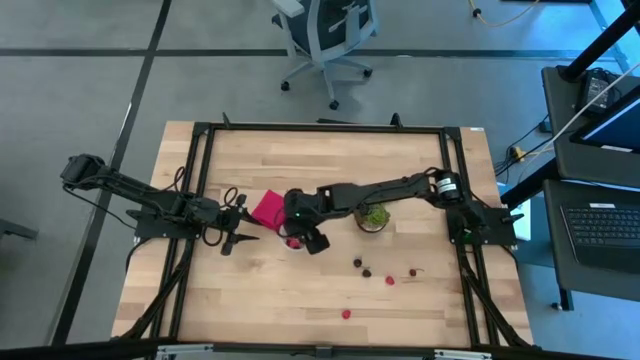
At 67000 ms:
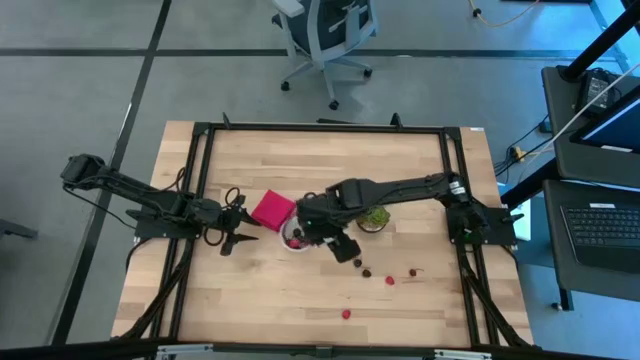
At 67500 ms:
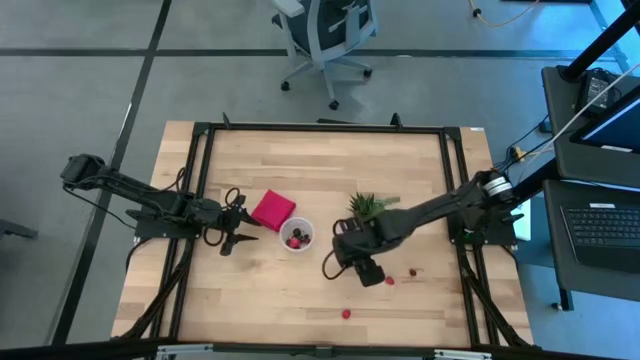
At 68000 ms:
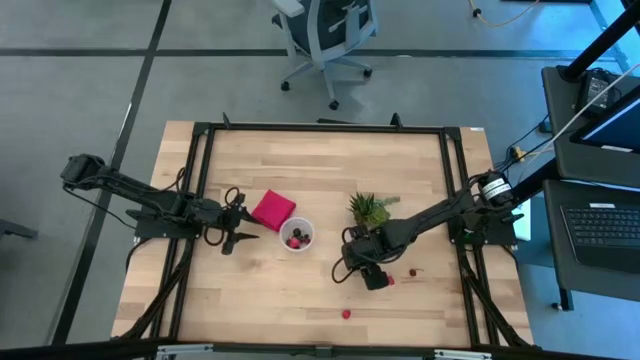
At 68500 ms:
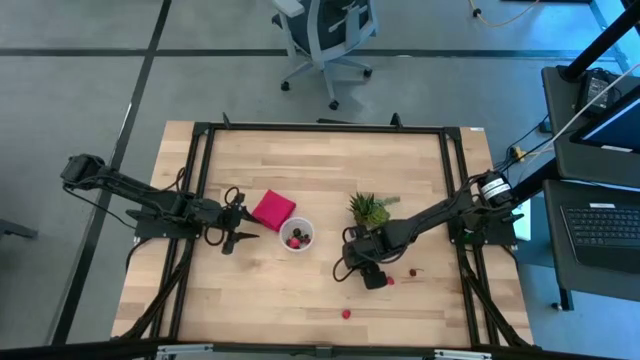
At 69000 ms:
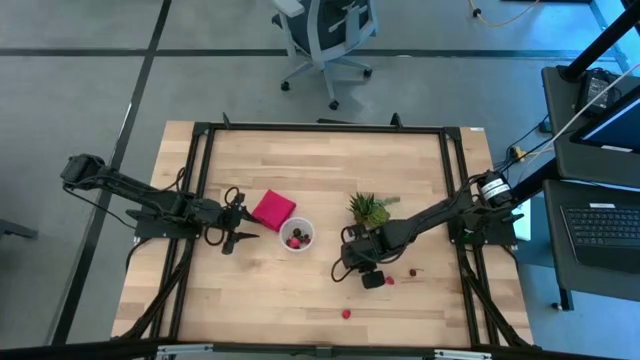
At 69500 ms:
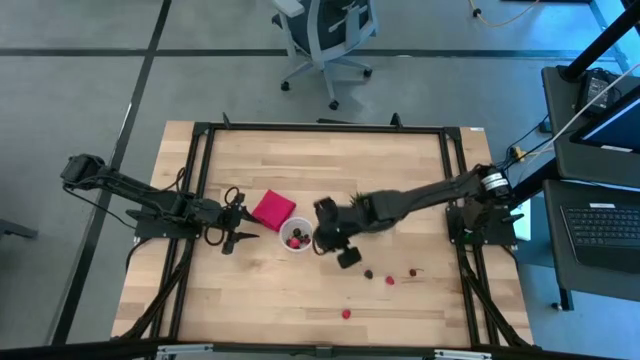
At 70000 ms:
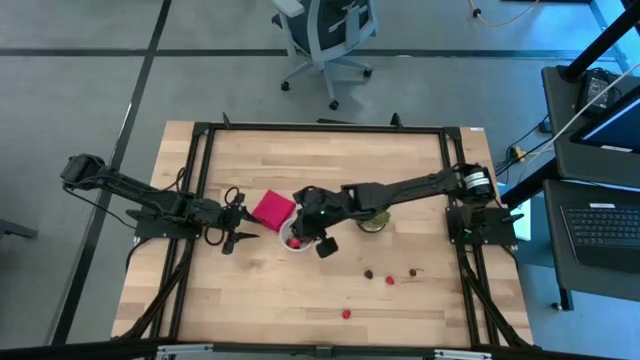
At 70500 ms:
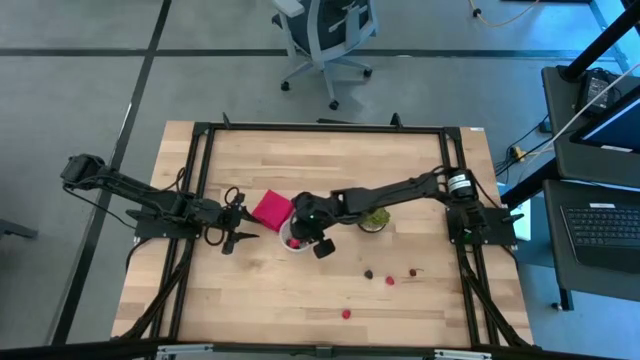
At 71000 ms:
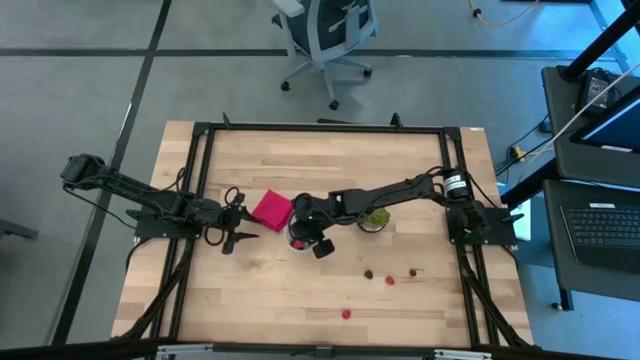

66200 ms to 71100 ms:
Task: Pick and placing Produce into tupperware
Put the black cherry into the container

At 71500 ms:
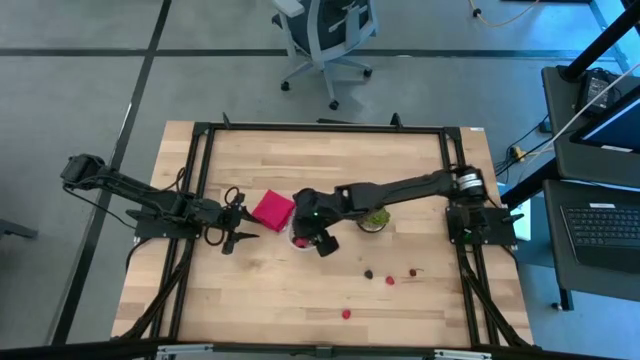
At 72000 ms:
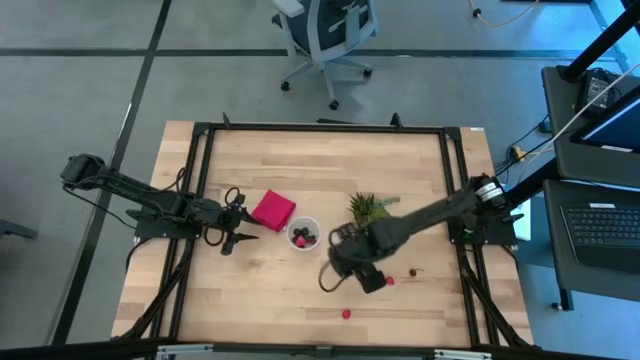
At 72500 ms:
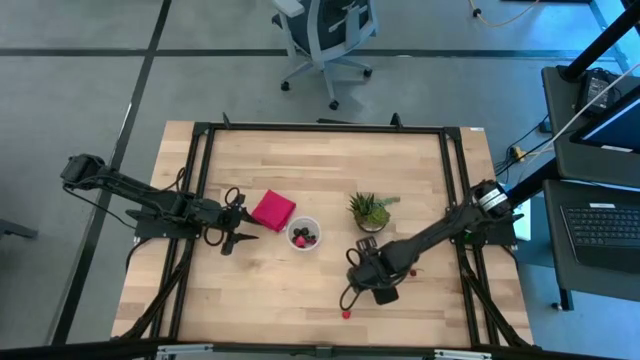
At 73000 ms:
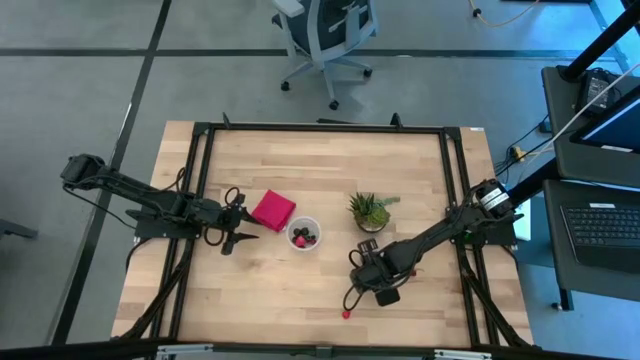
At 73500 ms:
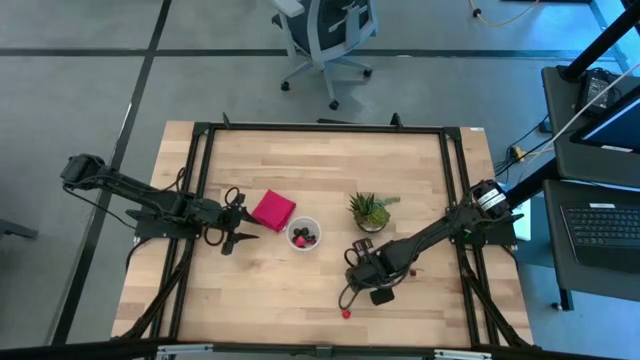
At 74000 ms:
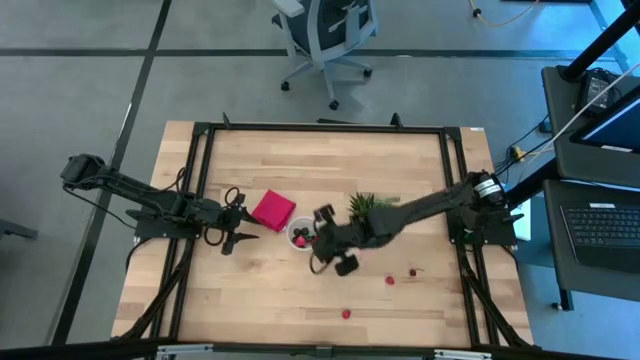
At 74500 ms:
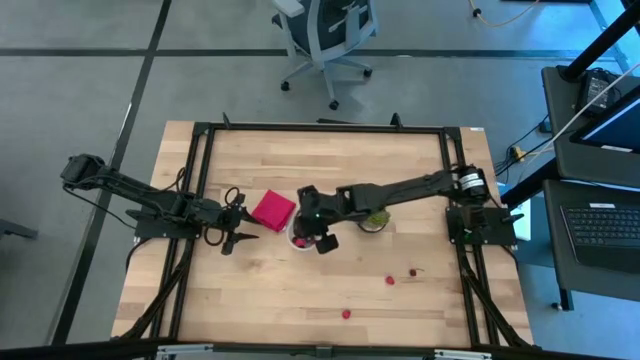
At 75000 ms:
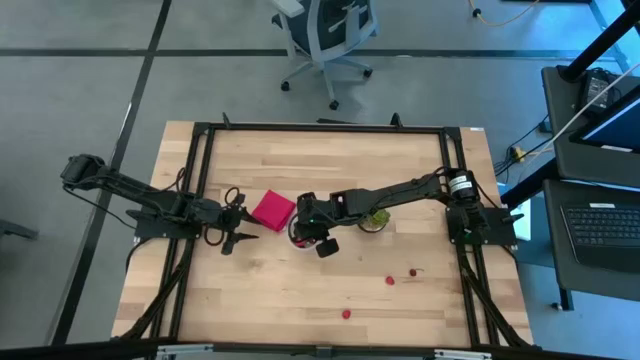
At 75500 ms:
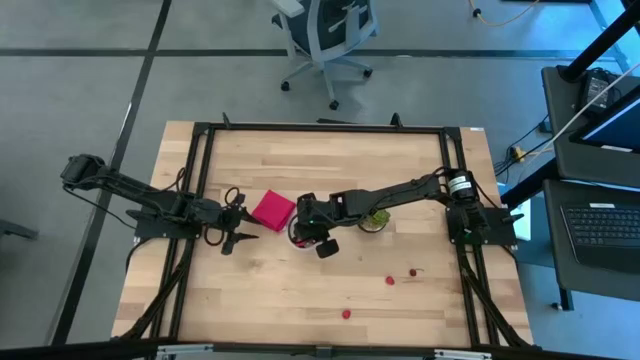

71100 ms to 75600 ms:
Put the blackberry into the container

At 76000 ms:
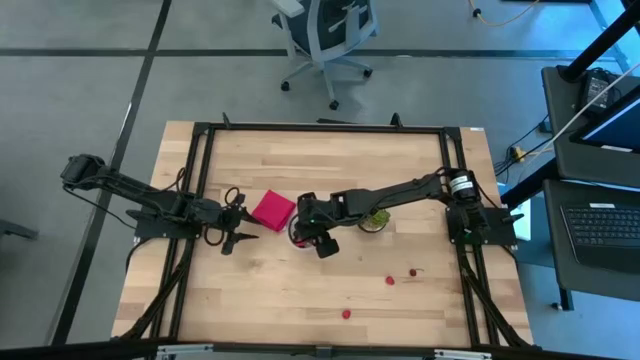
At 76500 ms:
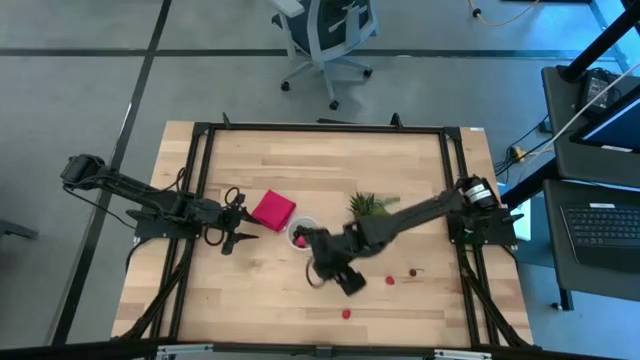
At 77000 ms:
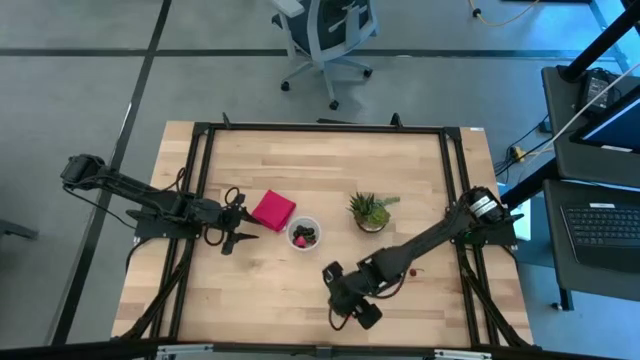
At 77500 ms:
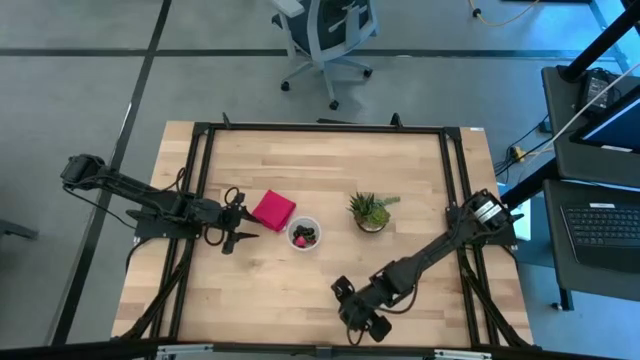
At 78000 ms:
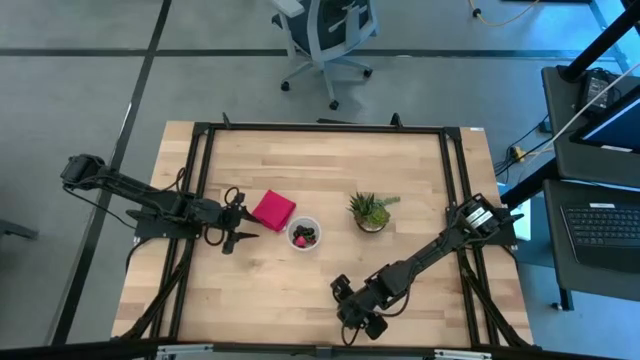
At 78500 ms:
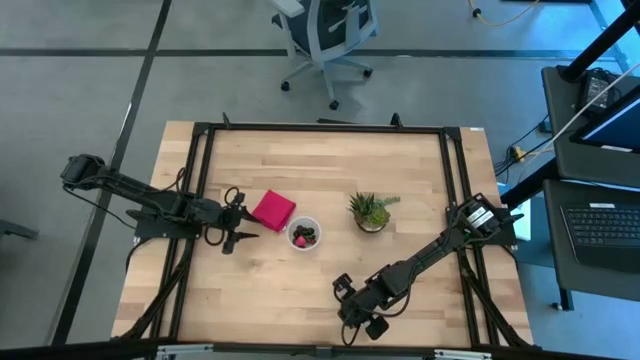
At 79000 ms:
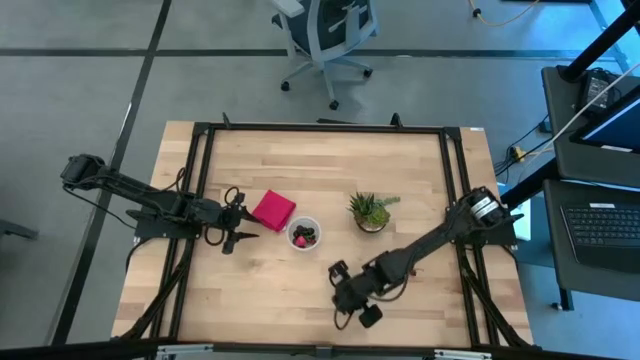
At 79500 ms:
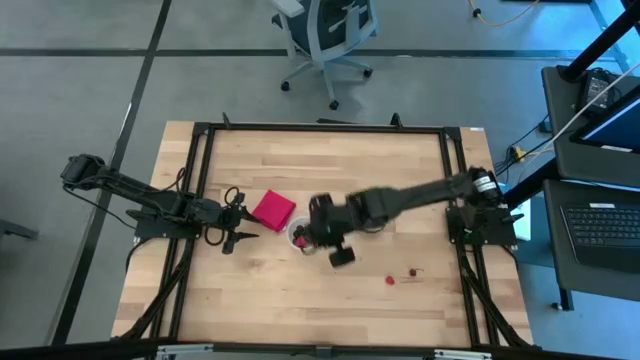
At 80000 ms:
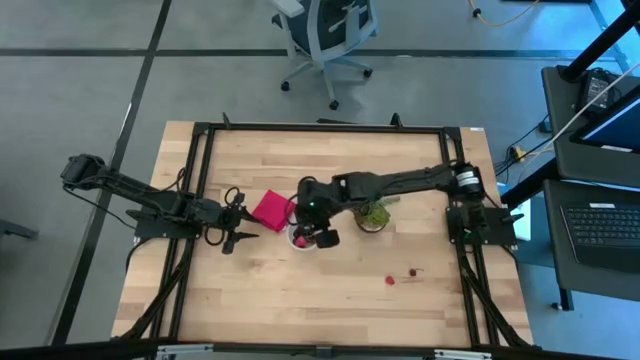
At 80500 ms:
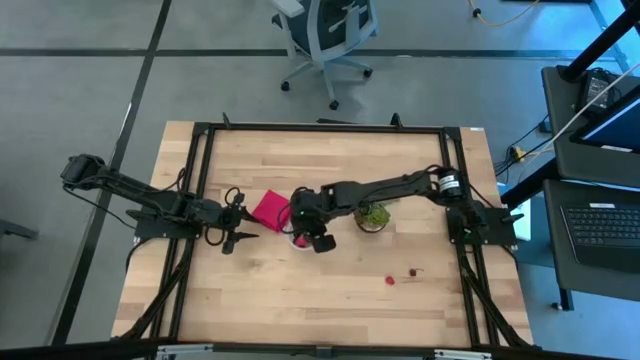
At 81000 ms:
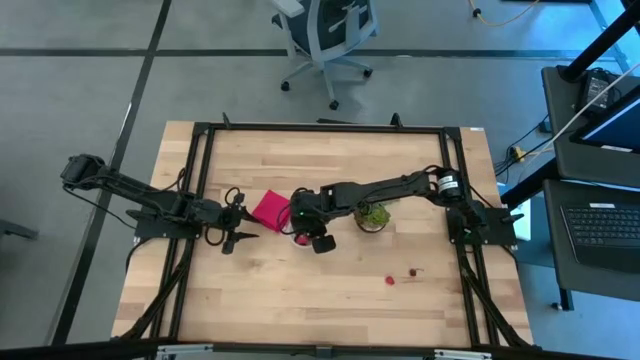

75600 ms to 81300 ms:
Put the red raspberry into the container

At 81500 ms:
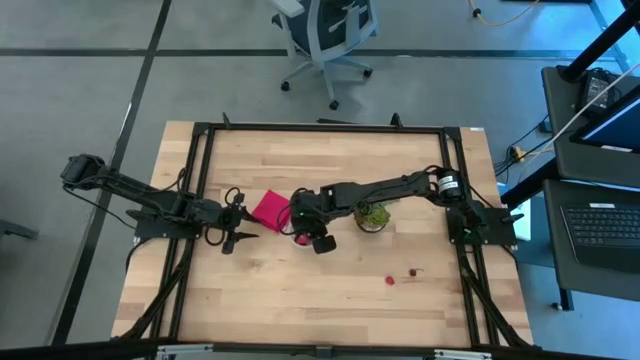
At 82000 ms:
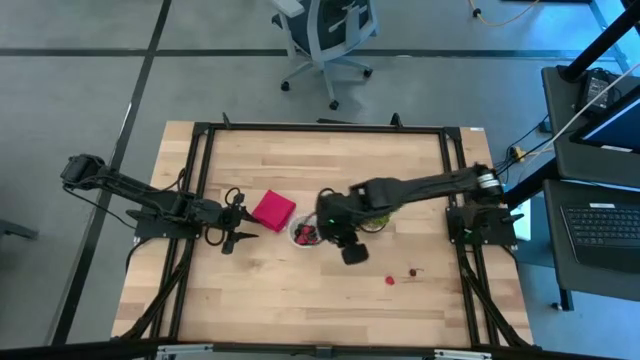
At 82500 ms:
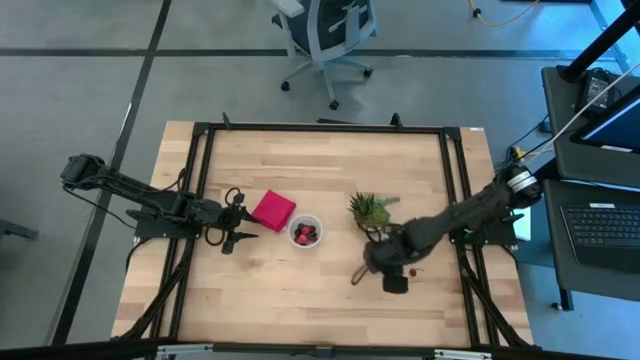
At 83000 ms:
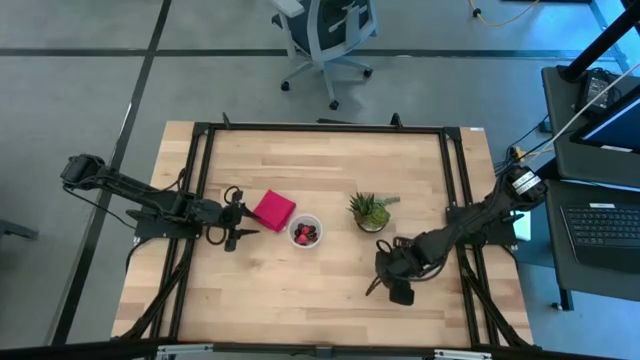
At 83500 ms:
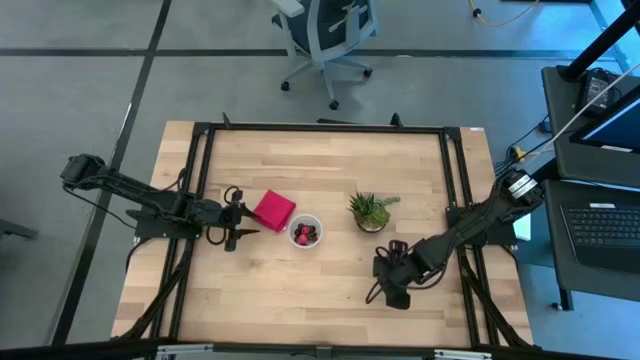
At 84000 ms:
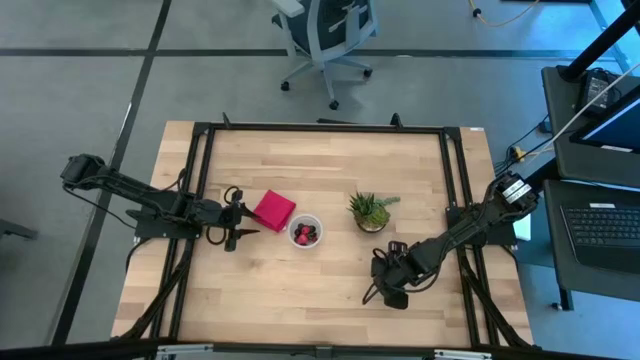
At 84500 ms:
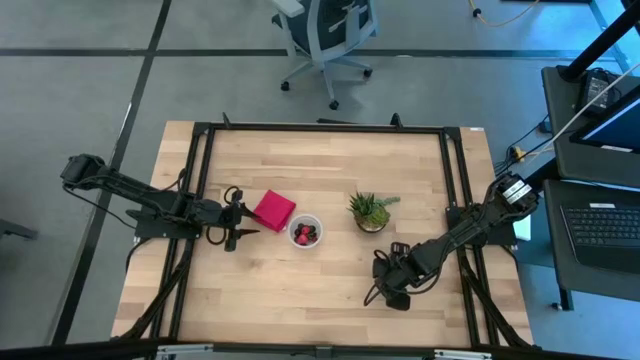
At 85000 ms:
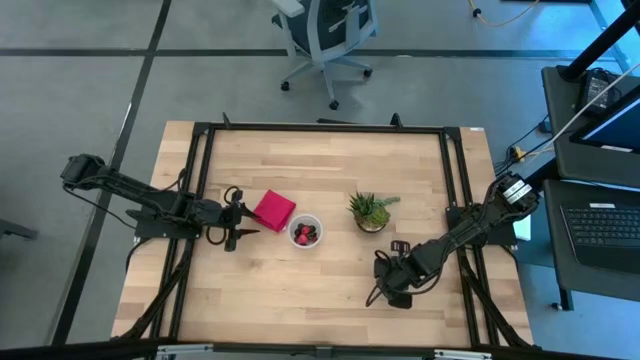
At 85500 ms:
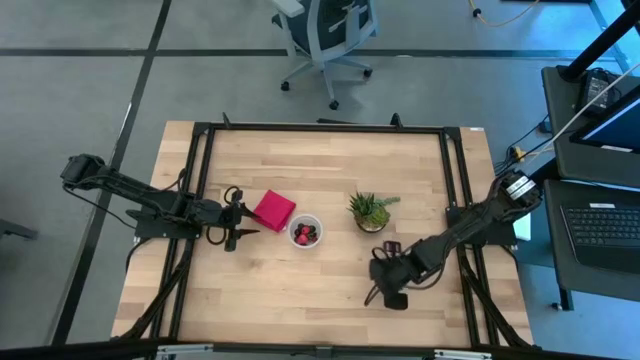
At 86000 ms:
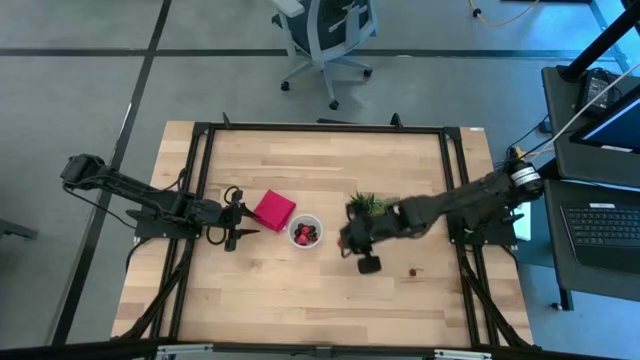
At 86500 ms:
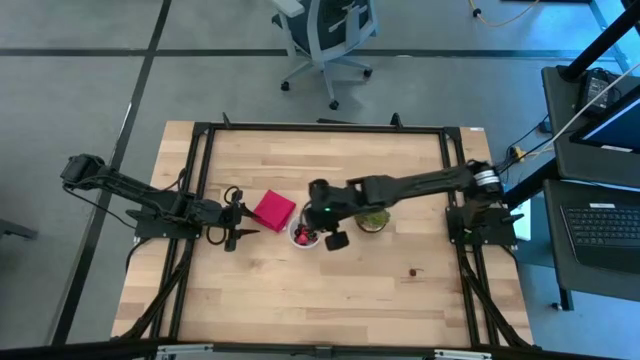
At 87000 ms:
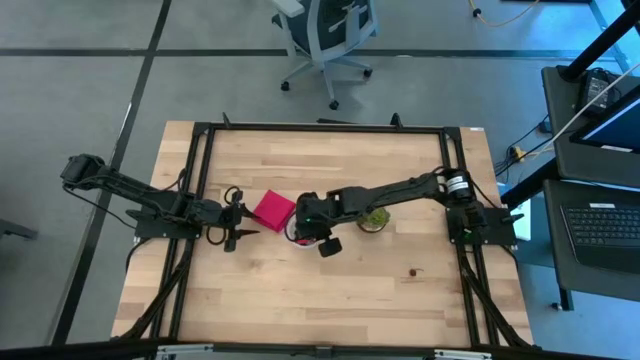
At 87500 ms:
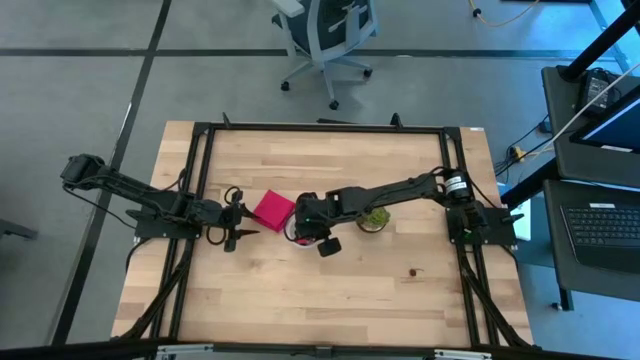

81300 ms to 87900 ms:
Put the red raspberry into the container
